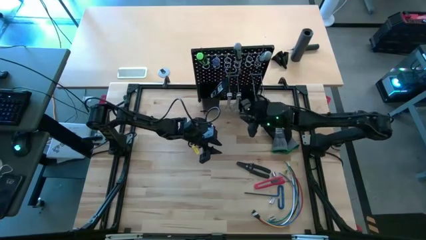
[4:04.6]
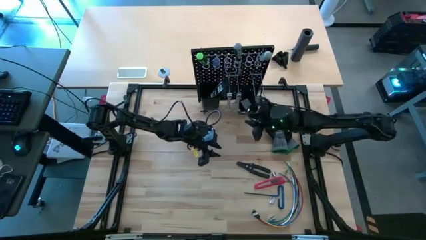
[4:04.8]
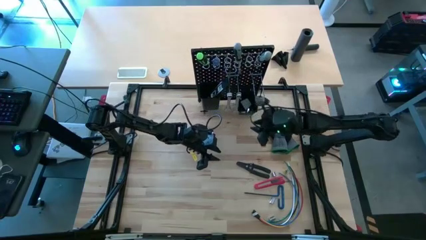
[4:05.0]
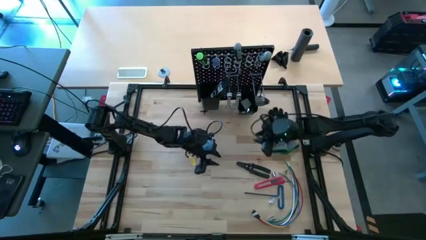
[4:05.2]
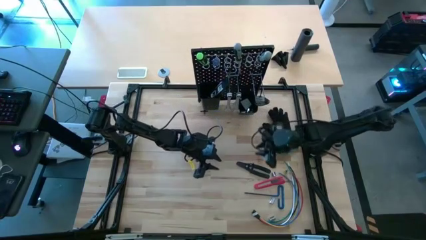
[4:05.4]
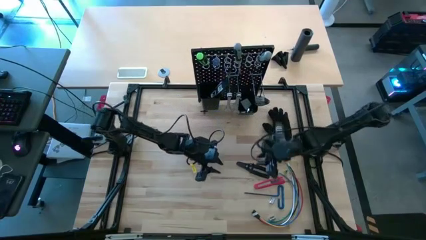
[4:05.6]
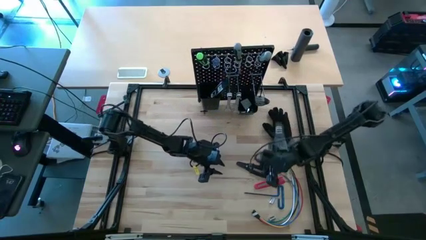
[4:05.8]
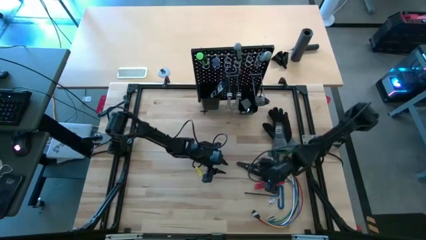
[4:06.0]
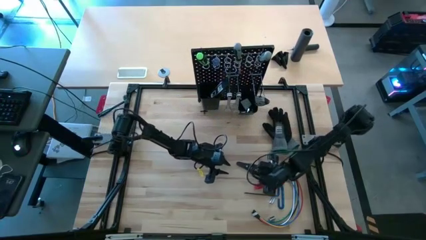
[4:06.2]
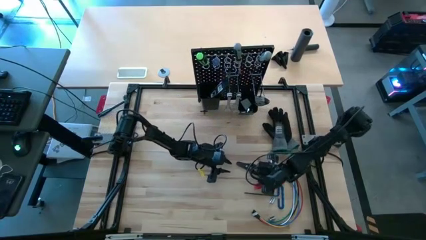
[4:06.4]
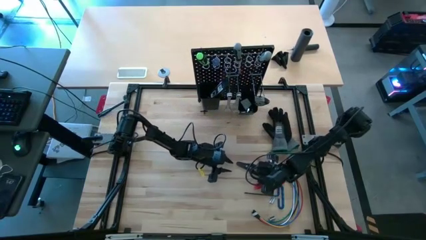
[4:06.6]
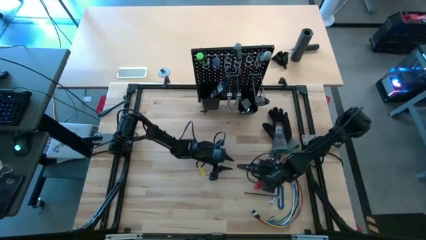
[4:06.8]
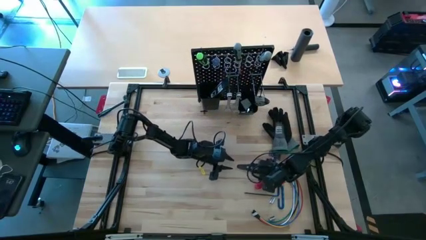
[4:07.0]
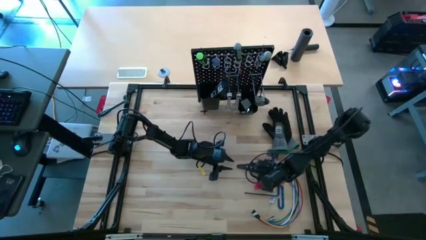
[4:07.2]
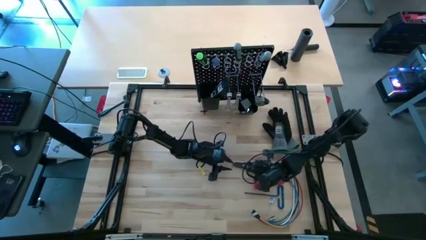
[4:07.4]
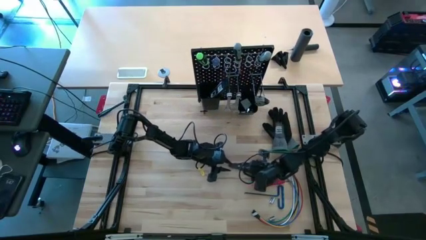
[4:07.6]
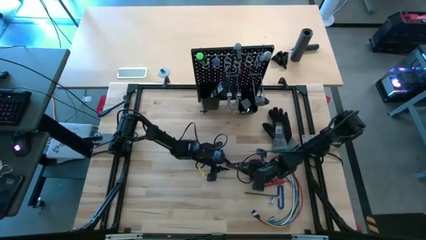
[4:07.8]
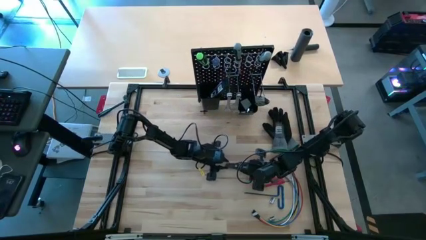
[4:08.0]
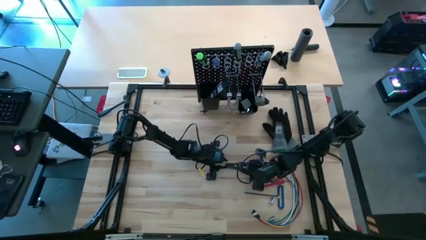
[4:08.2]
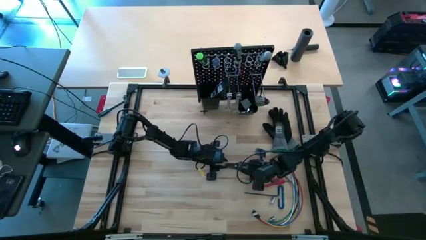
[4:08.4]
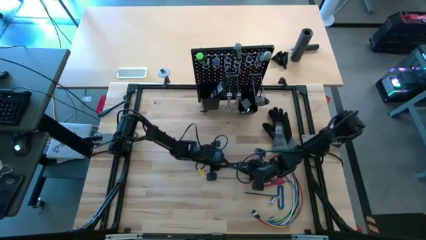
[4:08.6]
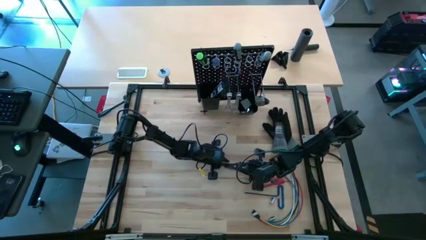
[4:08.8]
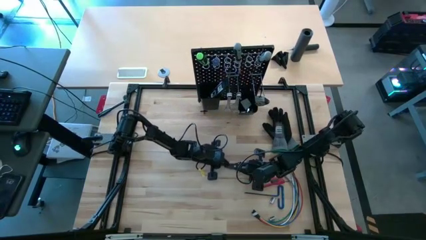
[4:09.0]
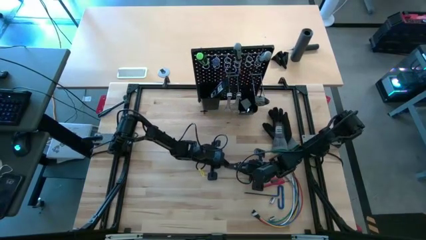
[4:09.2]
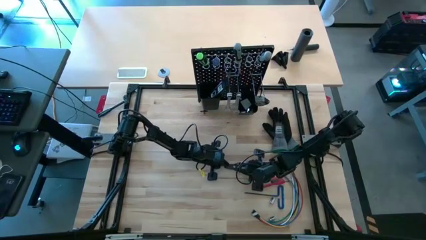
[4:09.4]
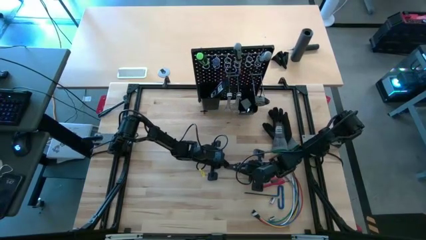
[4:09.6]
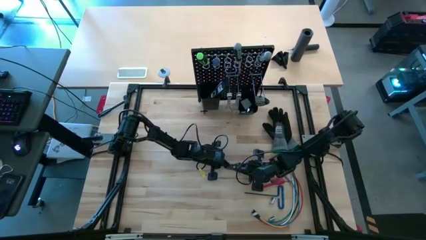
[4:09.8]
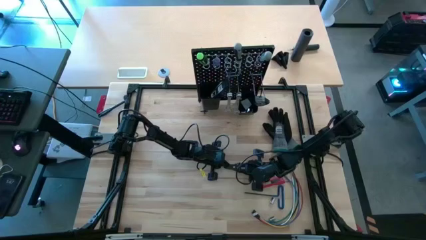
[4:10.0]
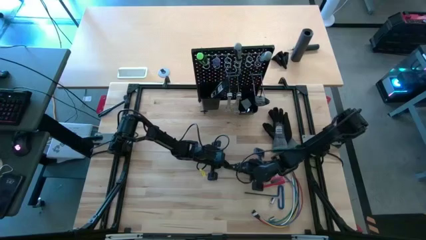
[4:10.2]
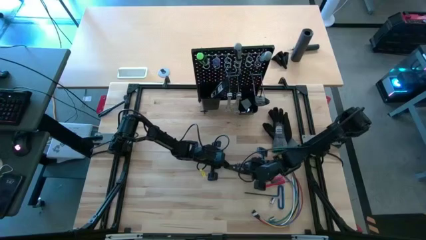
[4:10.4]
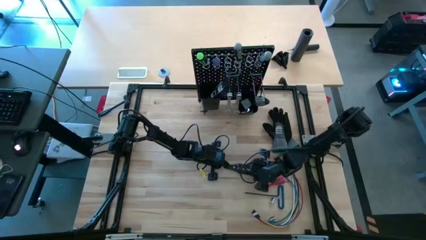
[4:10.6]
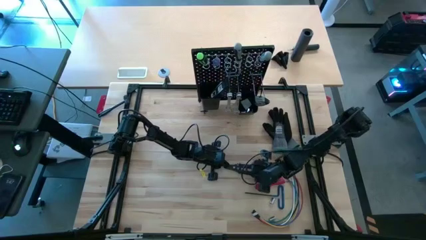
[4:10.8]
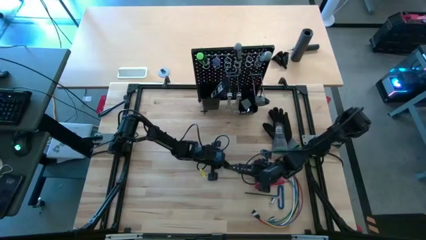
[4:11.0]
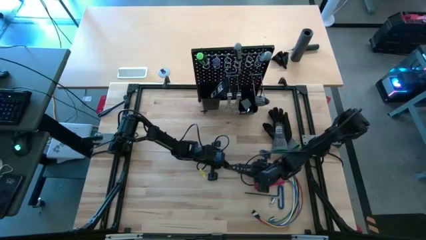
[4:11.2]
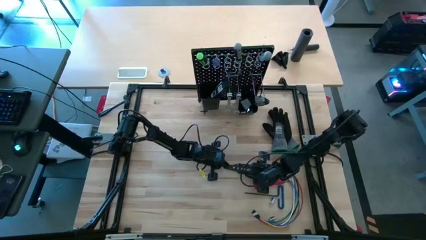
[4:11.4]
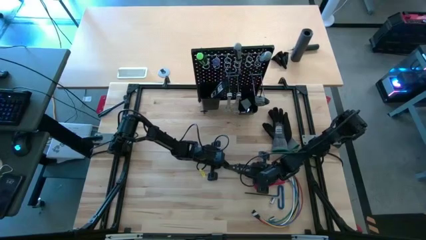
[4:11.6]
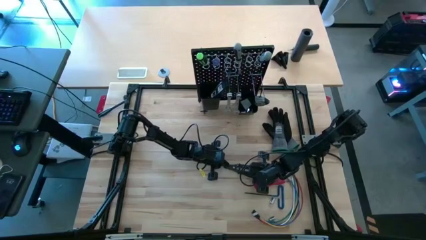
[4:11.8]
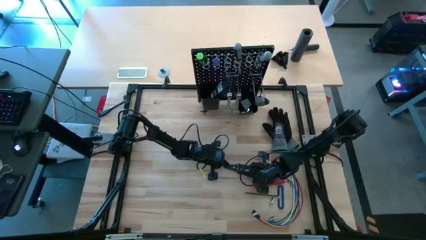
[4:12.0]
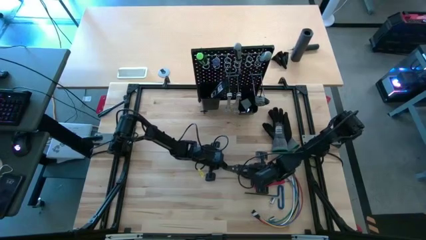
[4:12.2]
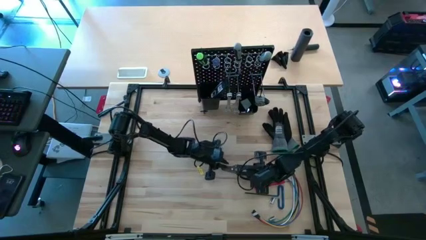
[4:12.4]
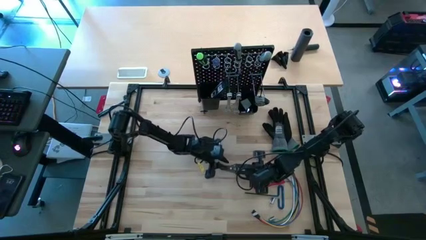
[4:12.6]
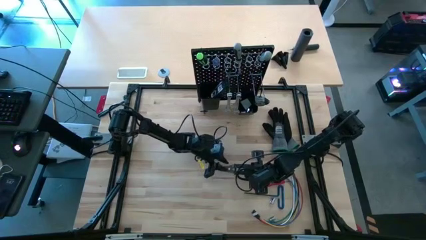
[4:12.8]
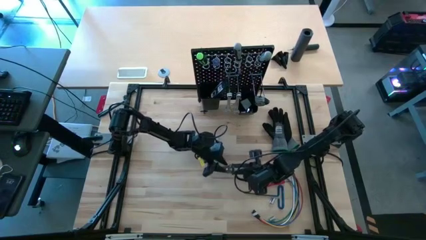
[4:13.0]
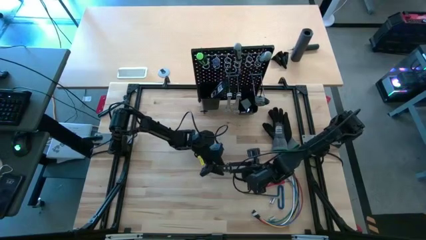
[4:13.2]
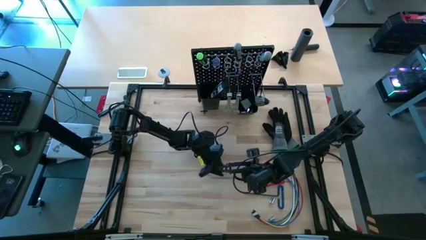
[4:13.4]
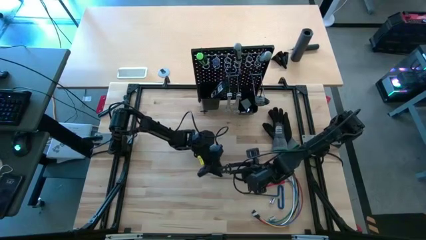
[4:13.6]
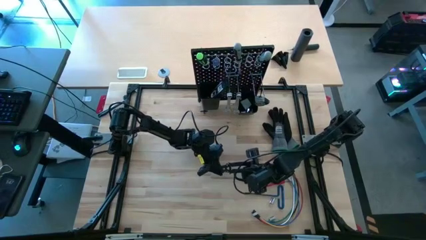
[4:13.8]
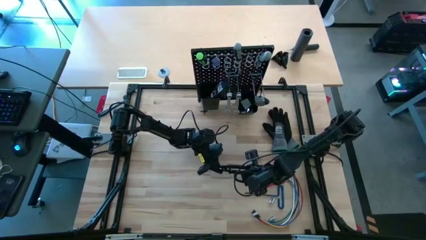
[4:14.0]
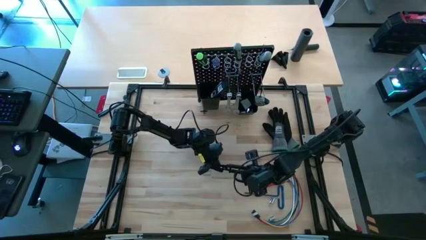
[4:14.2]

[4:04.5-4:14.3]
Task: Hang tools onto peg board
Hang the black wire stripper on the peg board

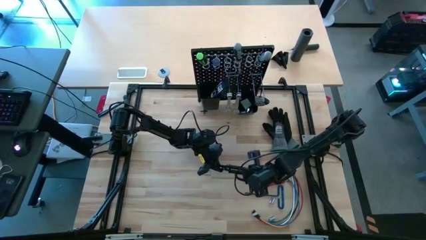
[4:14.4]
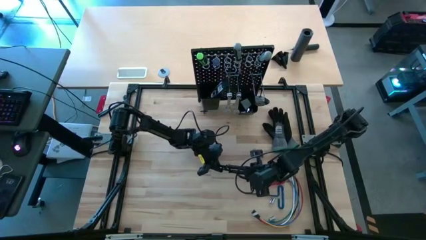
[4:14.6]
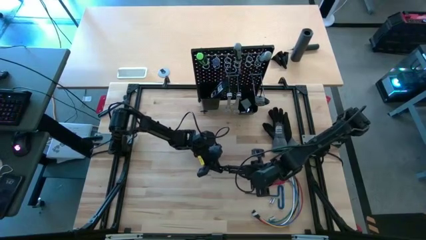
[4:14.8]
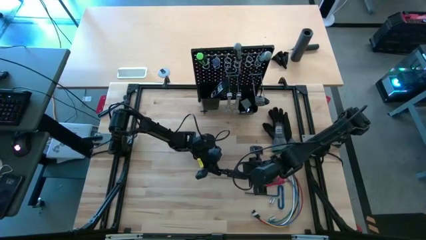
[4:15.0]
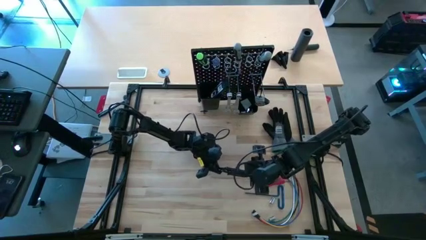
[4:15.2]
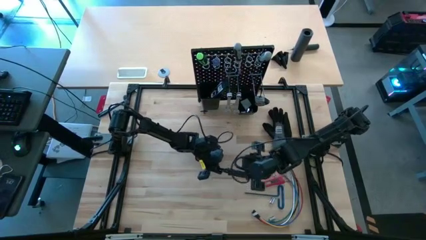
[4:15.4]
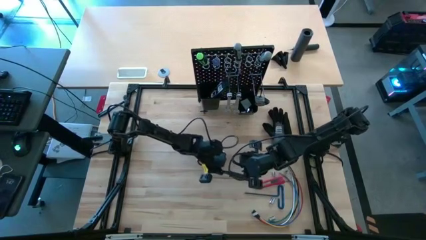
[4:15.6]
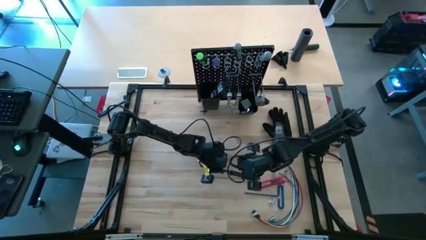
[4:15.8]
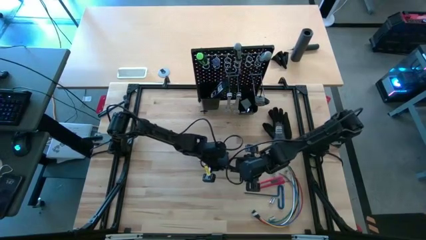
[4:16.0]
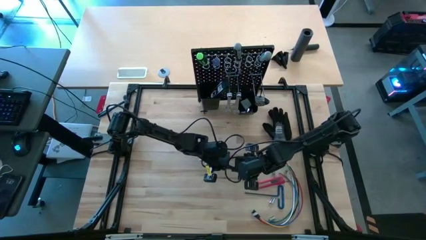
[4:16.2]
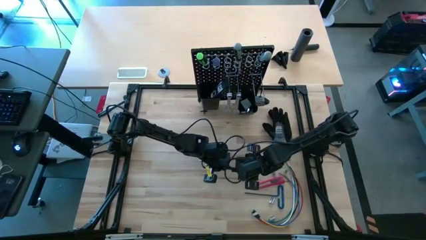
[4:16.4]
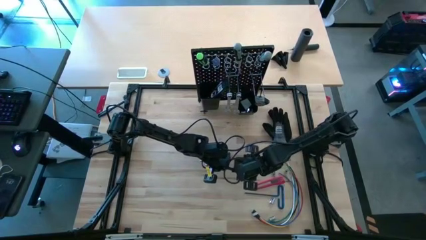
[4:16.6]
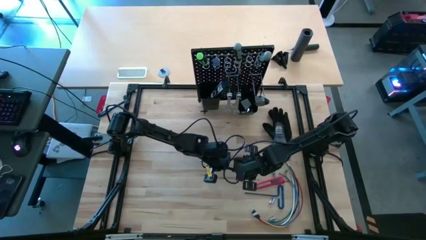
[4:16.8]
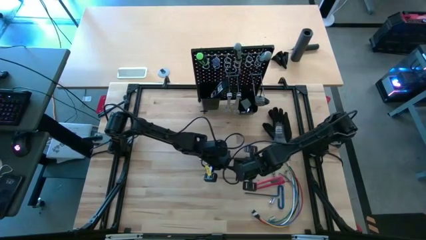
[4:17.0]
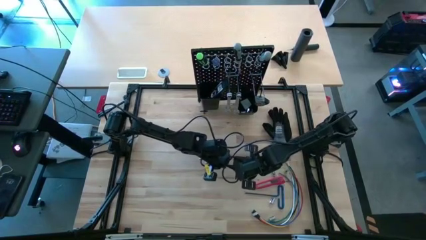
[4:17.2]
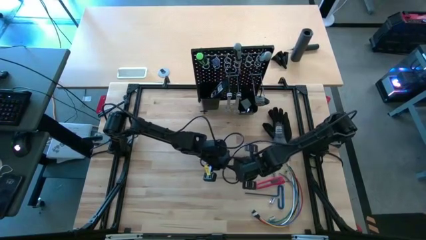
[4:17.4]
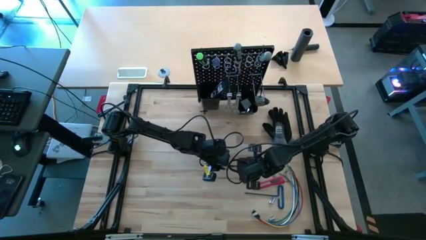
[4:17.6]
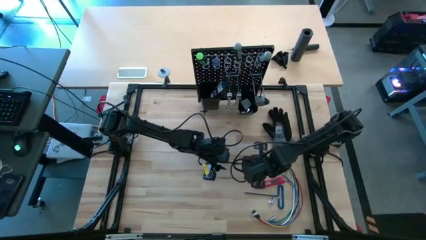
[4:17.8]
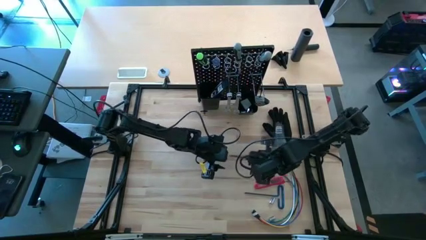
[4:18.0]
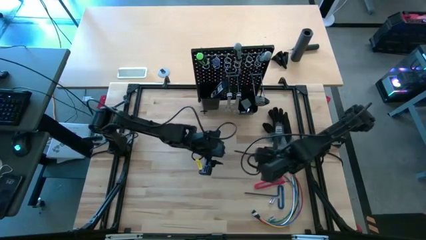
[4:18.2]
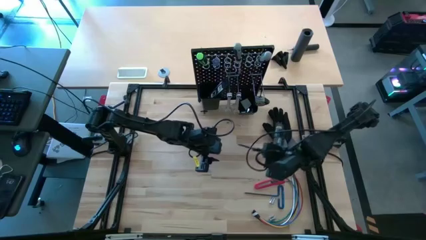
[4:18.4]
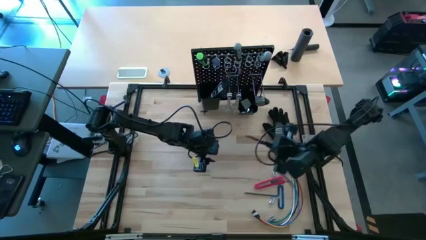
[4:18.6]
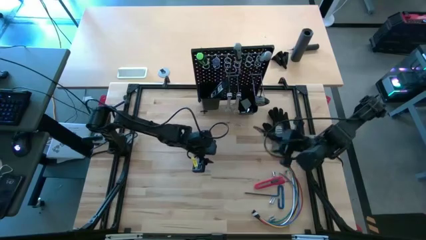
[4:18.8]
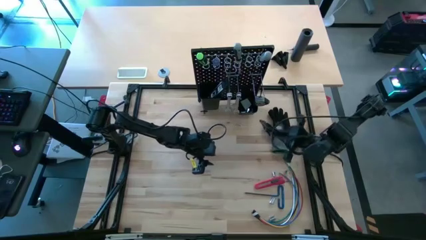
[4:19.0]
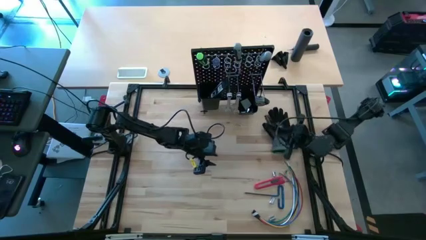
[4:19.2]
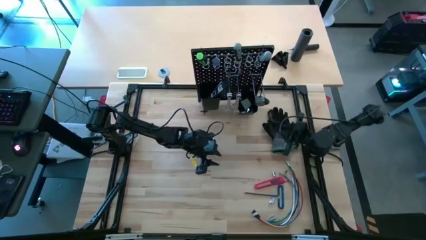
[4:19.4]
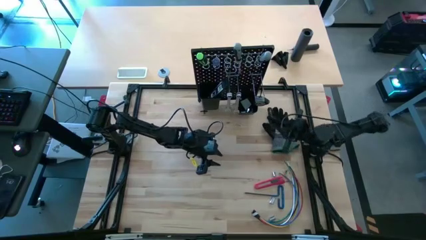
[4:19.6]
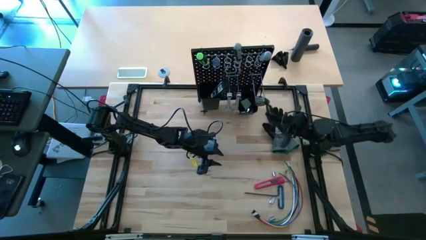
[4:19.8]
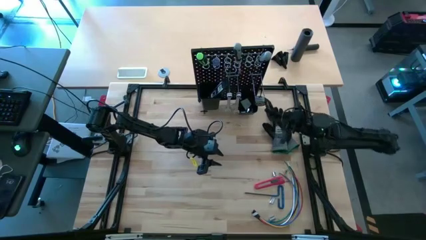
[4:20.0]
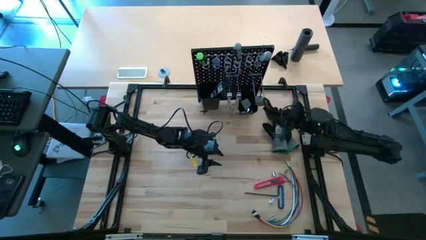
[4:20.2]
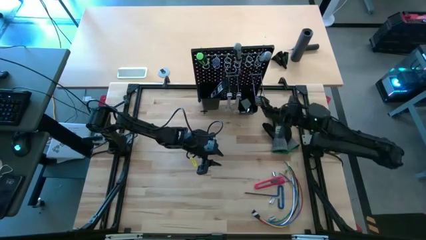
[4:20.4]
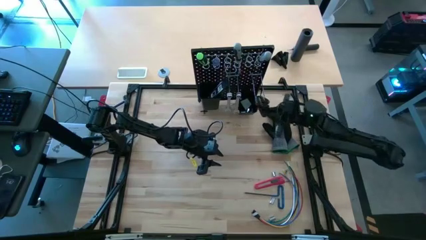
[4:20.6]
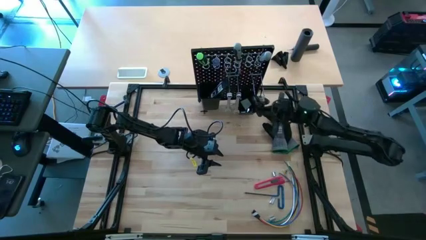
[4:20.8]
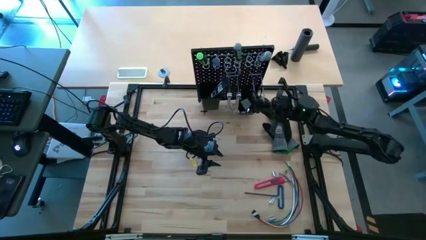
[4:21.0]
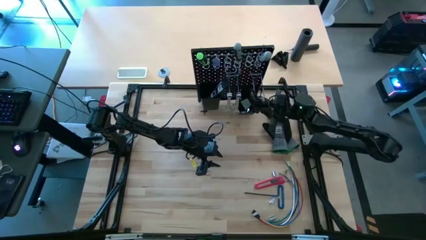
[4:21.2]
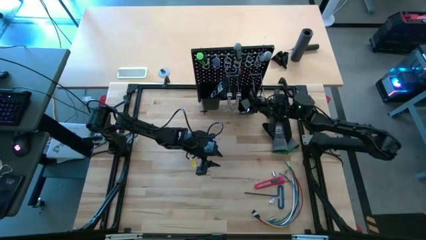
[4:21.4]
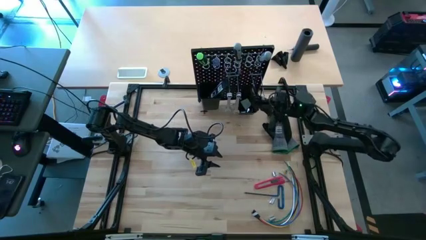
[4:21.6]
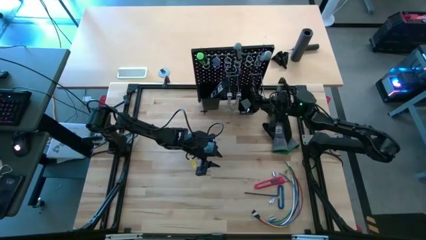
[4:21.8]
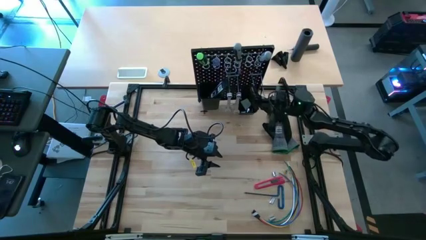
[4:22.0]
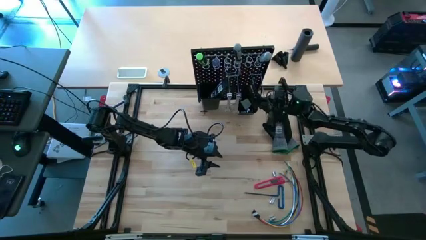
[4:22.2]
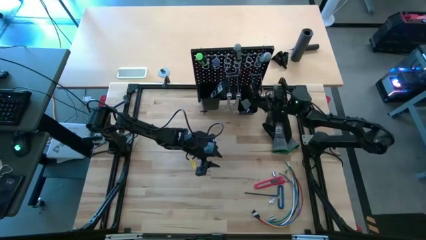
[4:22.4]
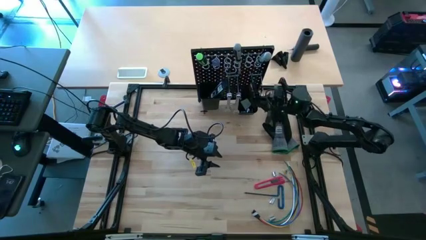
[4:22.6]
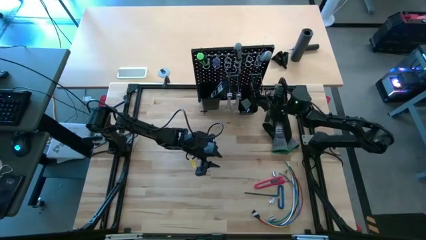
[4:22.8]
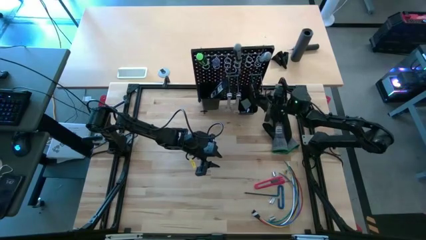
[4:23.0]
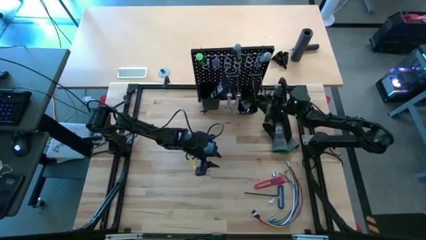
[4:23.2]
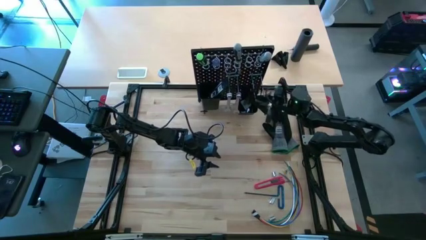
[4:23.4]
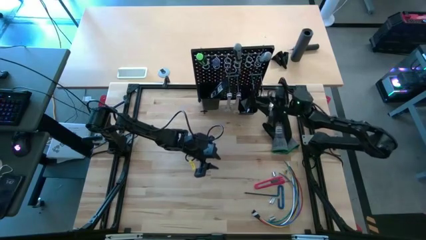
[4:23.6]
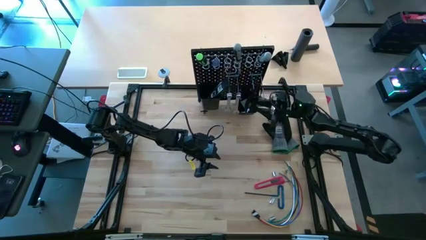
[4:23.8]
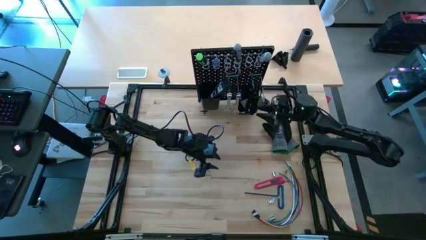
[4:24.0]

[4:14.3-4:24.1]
Hang the black wire stripper on the peg board
